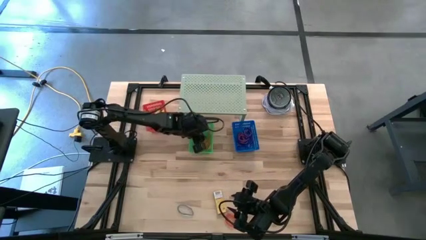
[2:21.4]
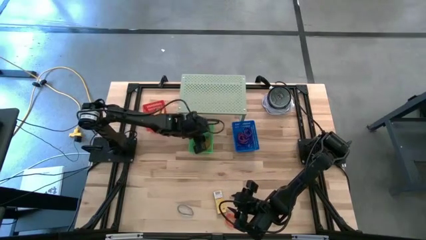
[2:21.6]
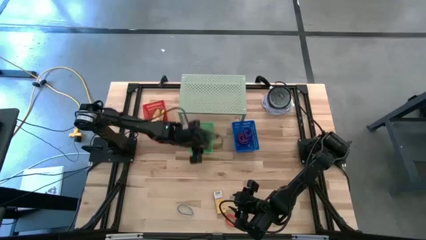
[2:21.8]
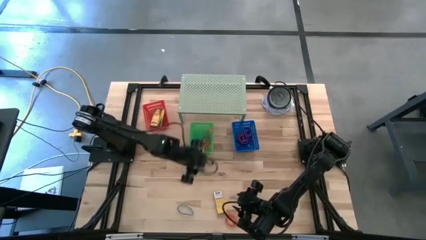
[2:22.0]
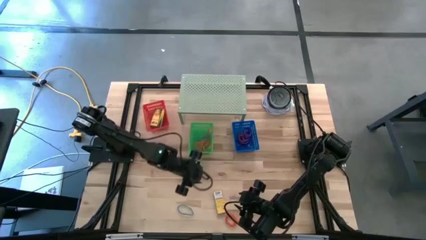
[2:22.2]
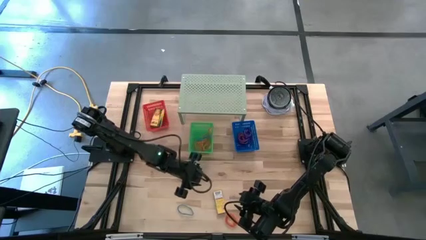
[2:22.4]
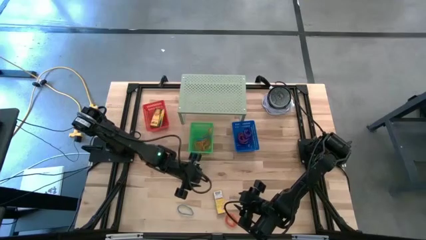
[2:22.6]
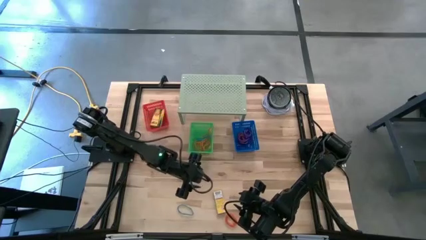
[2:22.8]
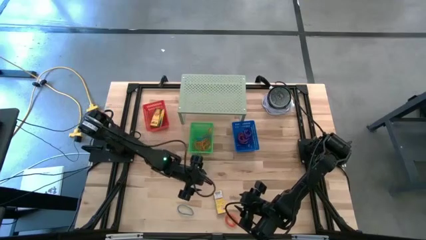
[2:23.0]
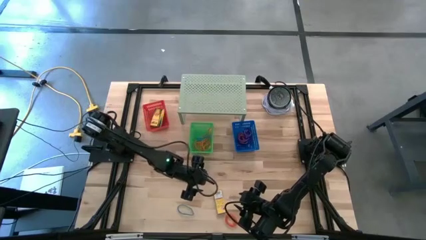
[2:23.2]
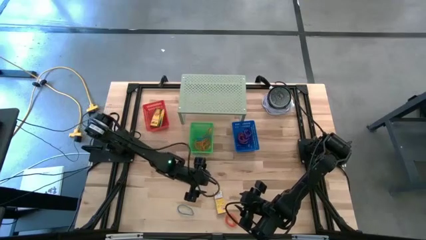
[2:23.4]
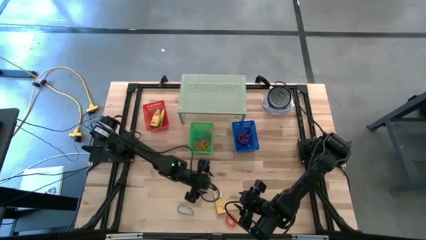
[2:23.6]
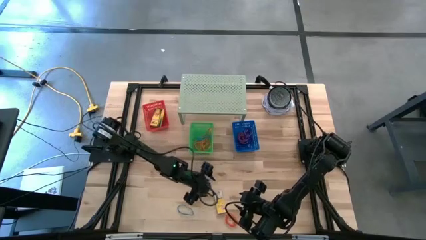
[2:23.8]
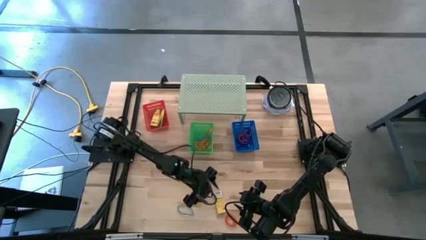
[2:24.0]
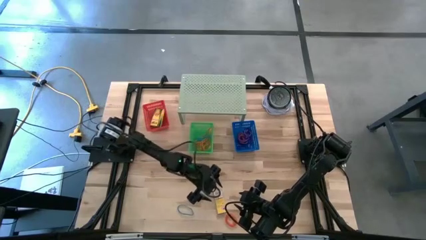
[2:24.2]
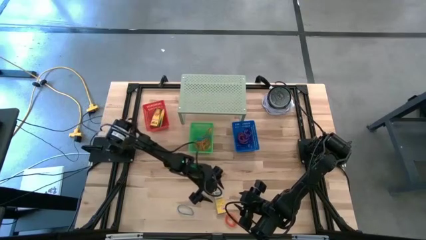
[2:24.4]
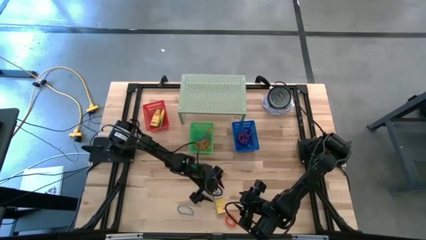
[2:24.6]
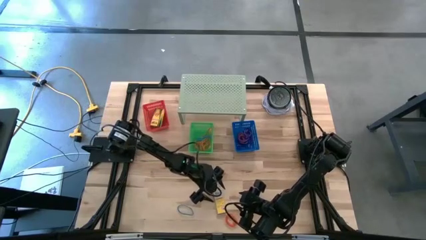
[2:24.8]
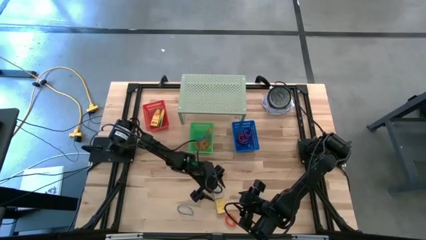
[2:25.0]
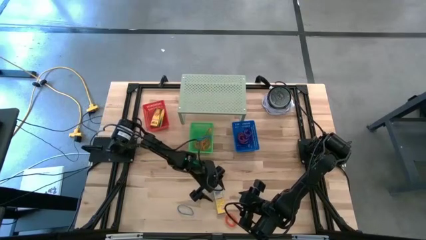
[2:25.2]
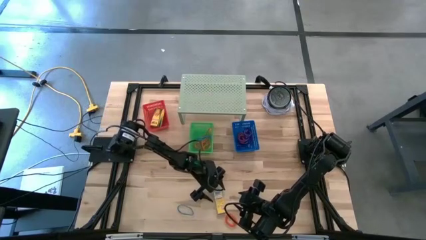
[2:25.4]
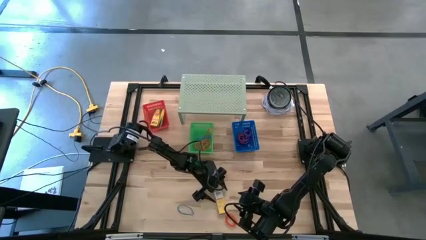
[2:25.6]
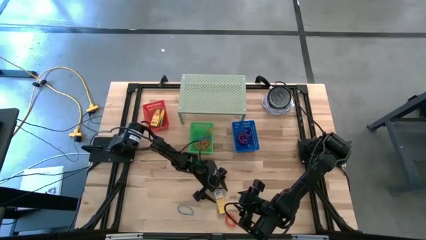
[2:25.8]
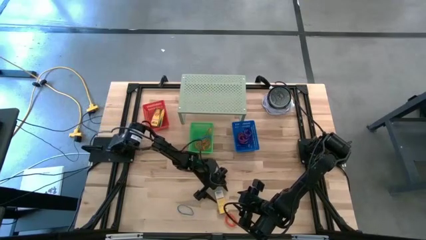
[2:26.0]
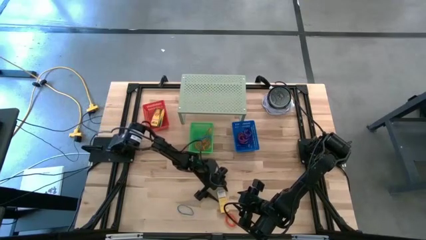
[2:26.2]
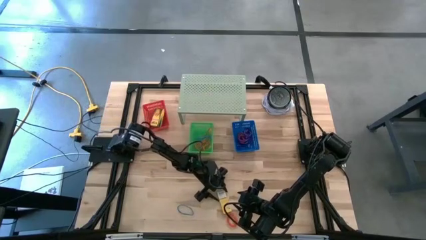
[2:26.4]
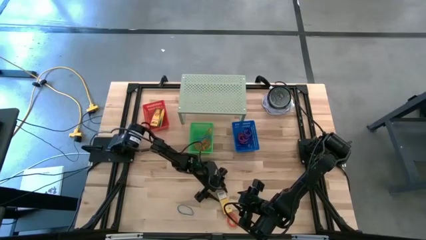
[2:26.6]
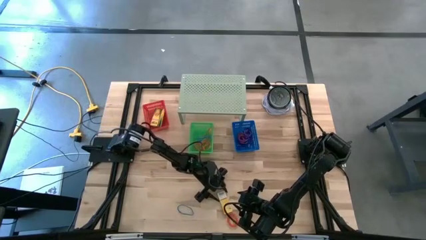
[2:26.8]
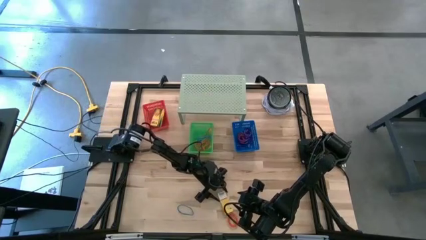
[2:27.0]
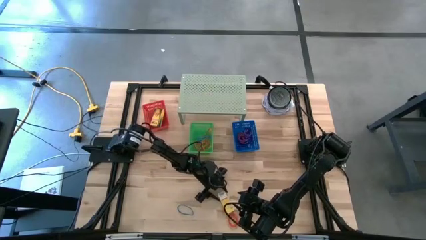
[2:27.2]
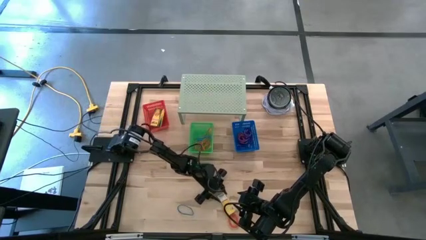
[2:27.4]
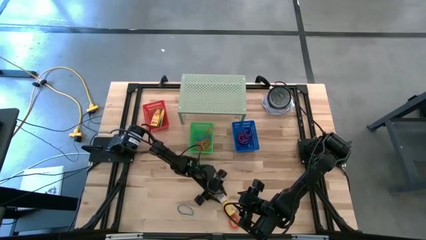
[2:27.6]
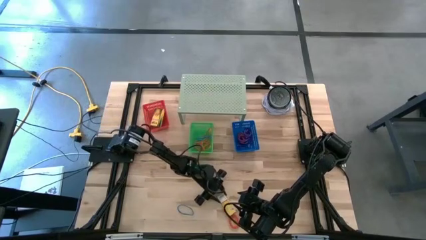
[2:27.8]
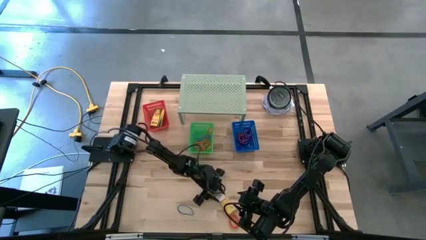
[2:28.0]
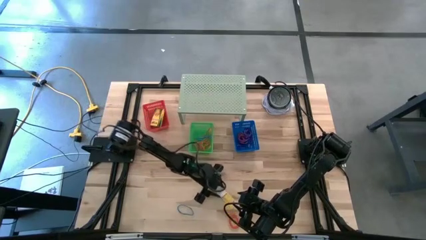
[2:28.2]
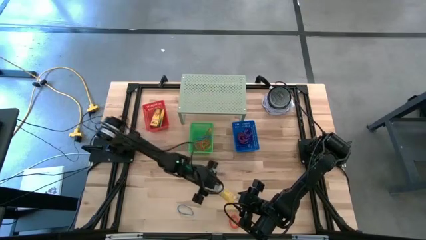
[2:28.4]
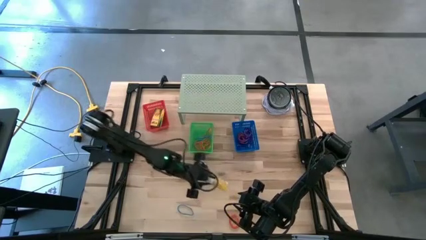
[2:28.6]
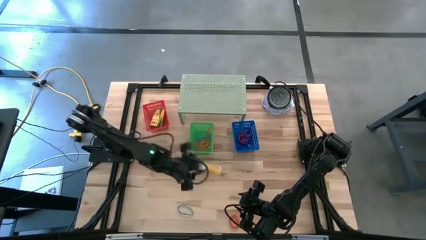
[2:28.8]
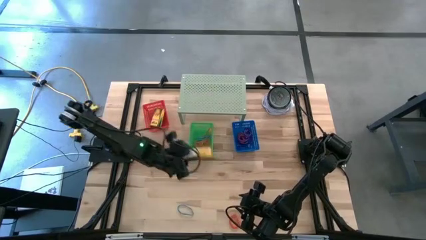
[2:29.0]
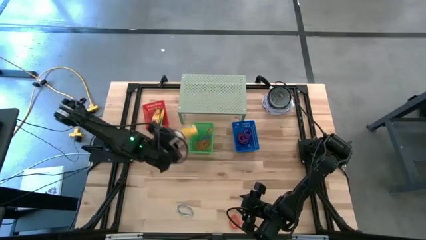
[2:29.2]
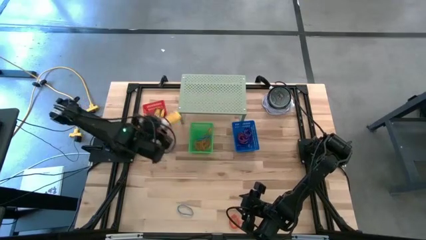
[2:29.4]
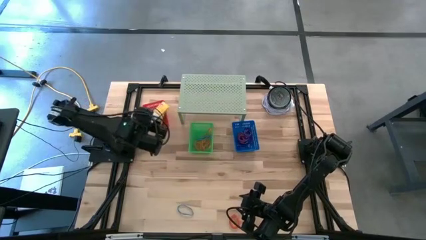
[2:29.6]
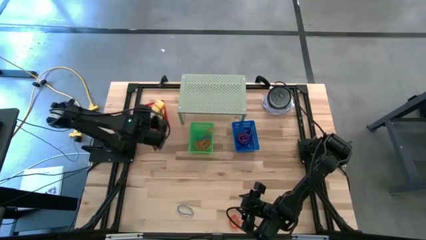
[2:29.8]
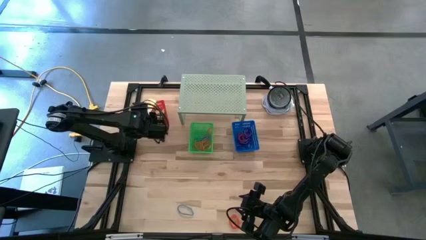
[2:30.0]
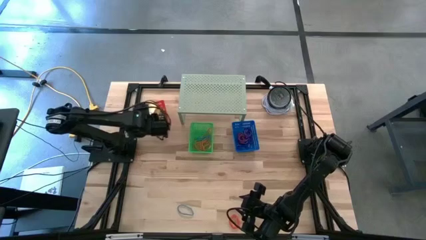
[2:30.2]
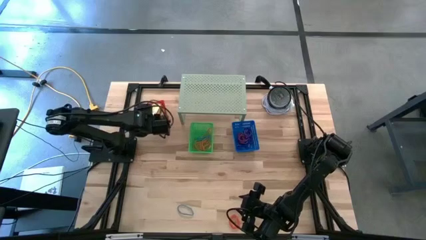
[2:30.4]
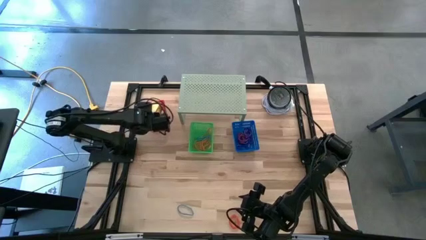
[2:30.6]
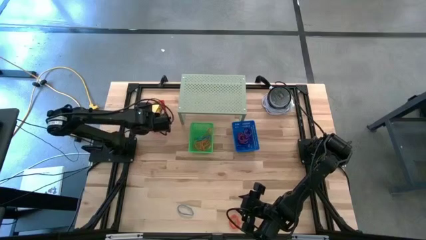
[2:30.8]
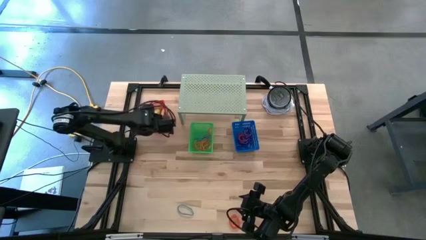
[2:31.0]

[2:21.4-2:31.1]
Task: Pick & Place Office Desk Supplies
Put the yellow crayon box into the red bin

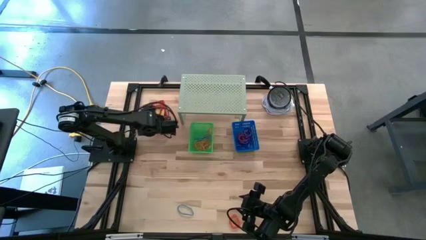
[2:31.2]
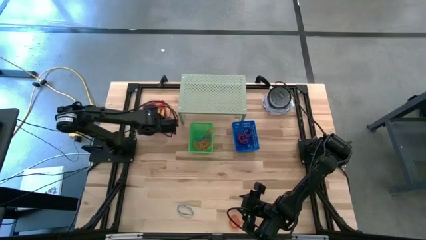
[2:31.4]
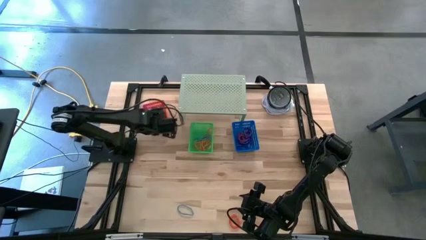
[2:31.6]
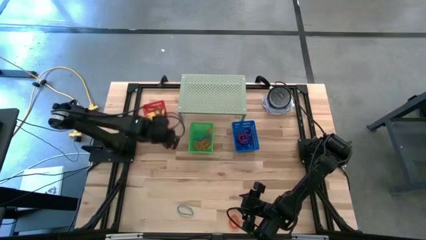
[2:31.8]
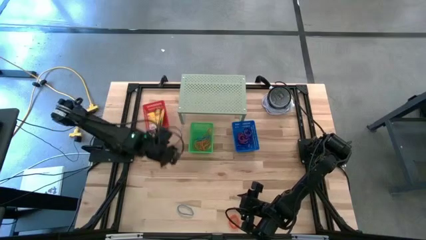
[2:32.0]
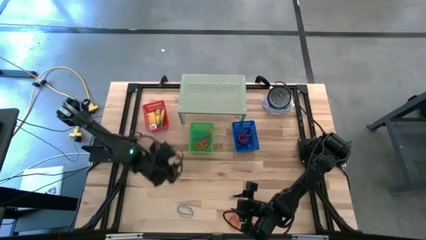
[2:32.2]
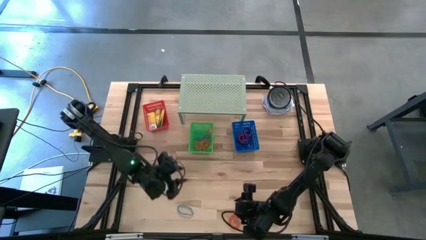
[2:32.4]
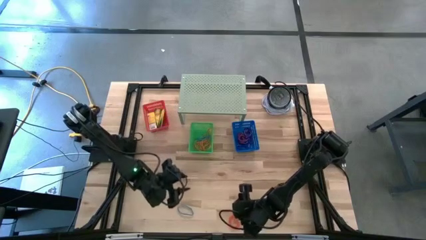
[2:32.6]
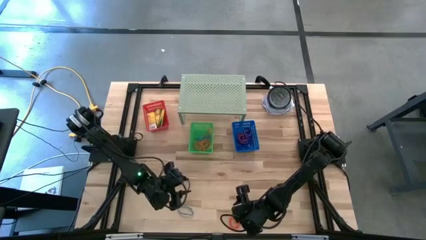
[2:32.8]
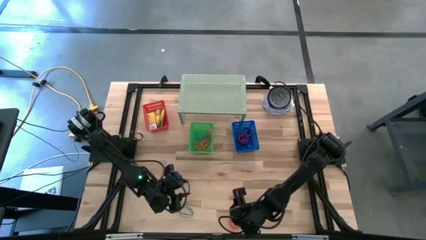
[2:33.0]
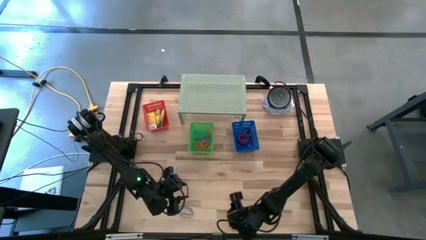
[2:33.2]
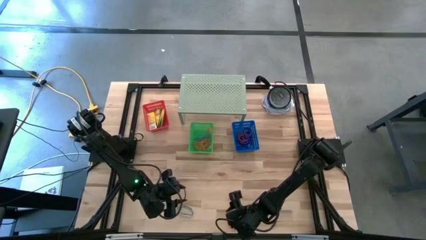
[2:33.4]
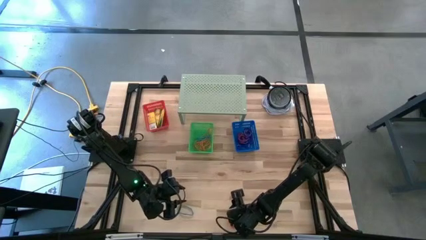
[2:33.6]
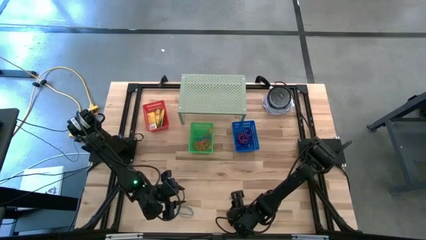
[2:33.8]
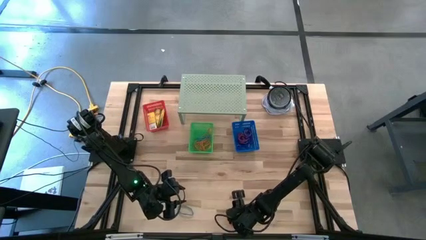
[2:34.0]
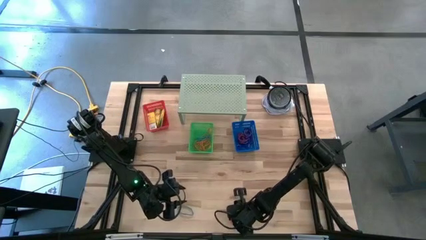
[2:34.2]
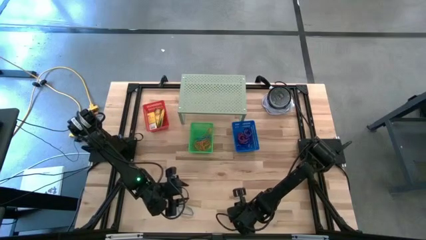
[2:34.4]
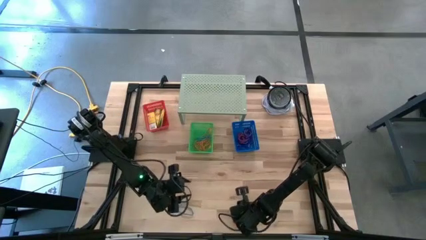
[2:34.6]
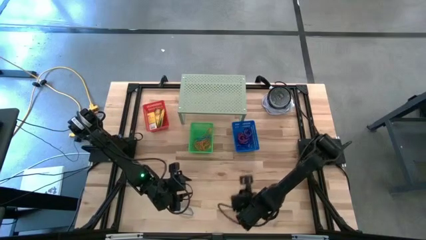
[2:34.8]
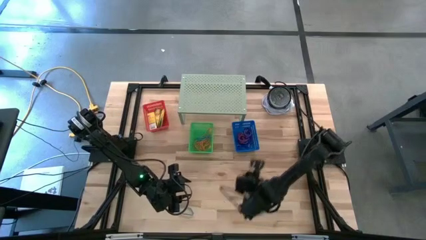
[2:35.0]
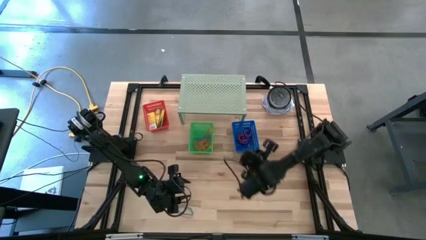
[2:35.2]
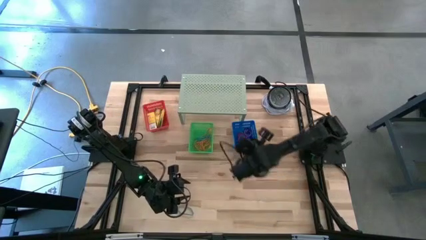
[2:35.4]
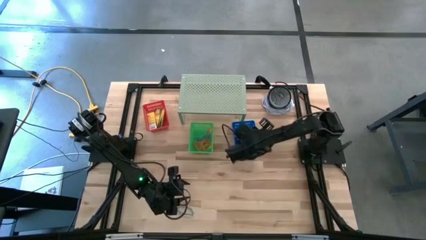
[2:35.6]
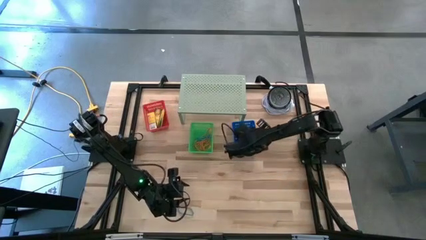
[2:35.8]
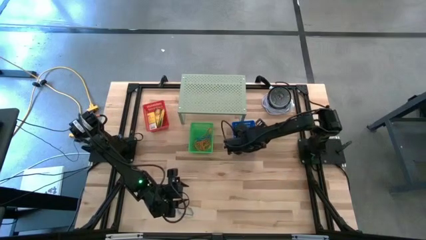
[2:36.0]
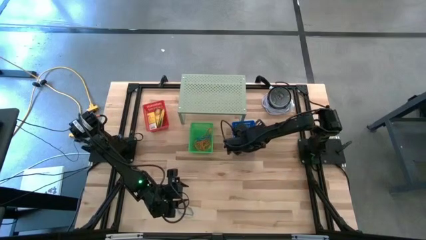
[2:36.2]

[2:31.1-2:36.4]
Put the orange spring keychain into the blue bin
